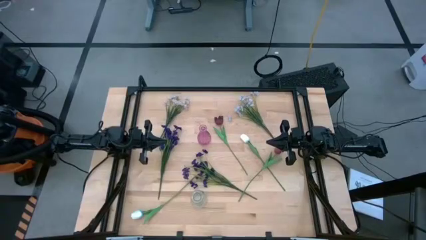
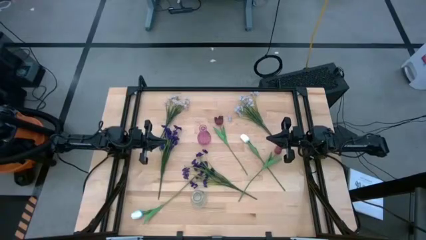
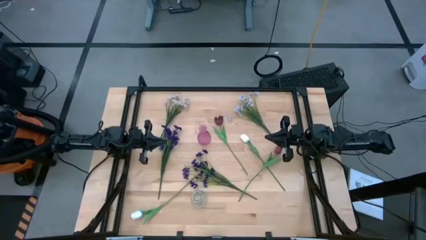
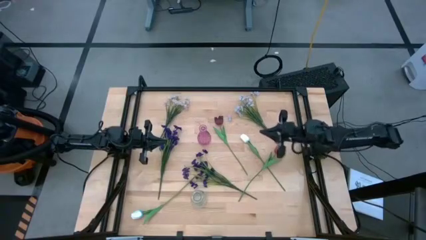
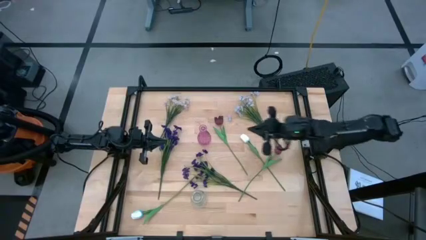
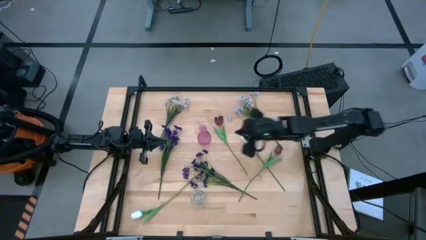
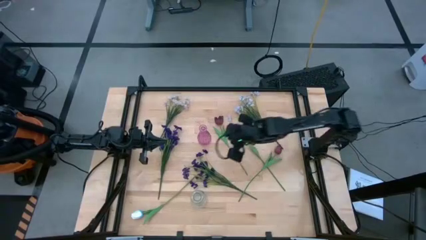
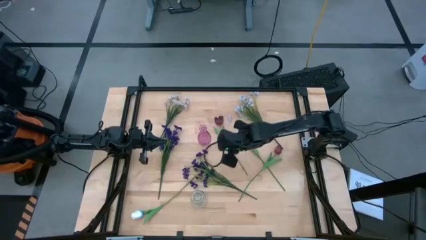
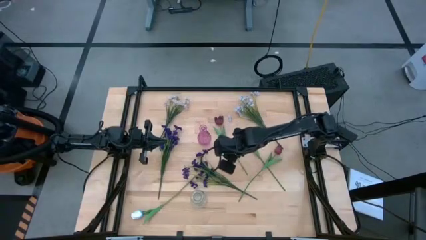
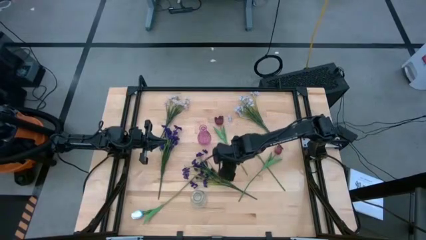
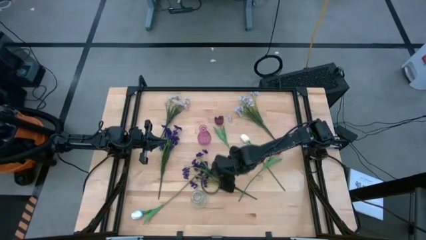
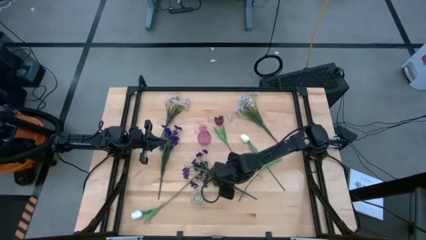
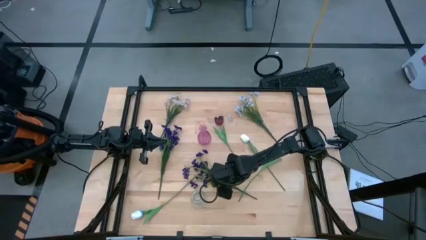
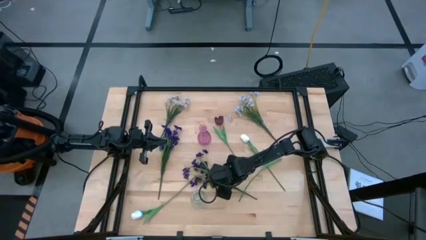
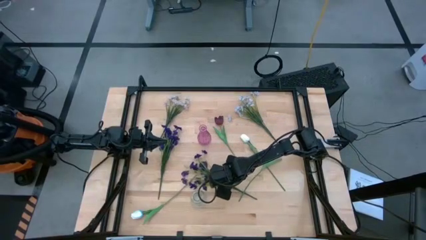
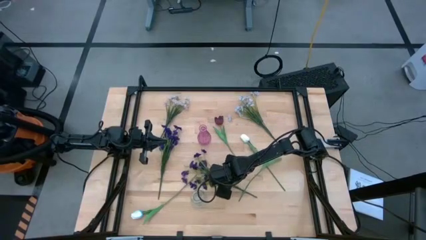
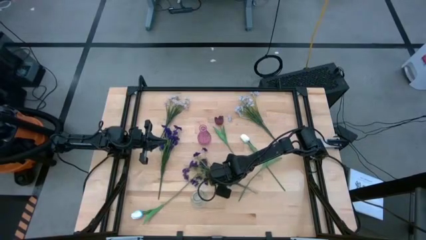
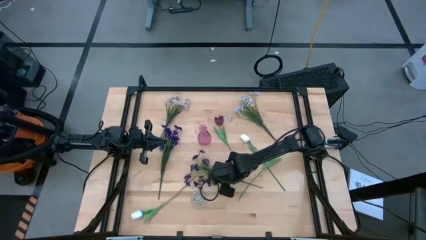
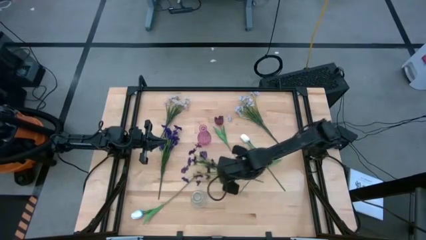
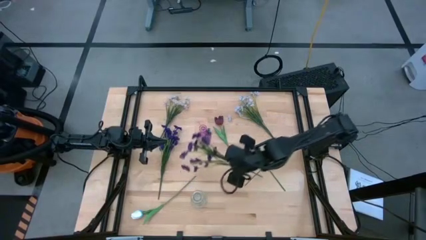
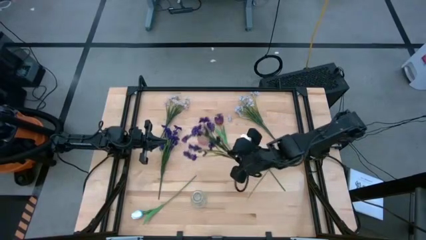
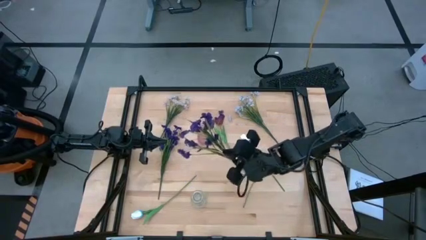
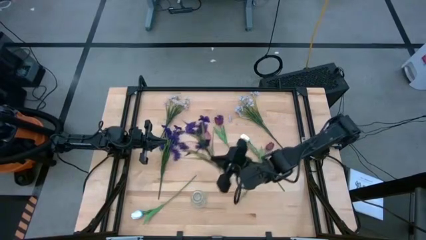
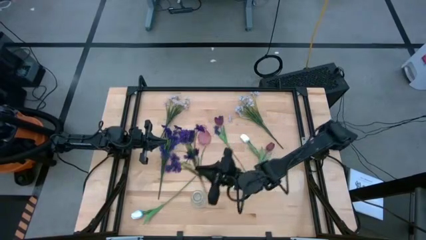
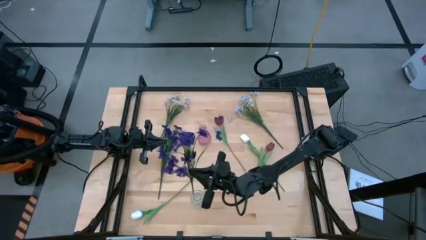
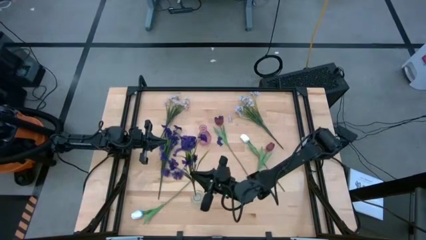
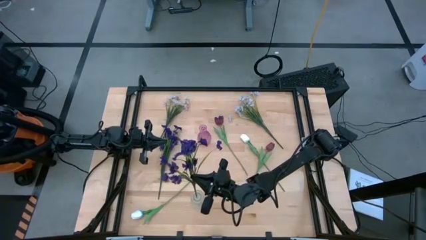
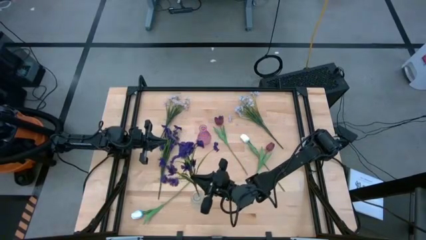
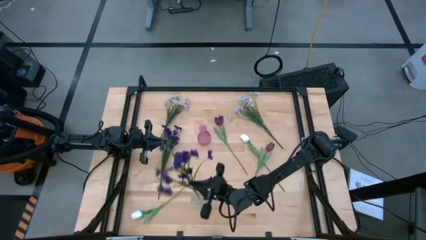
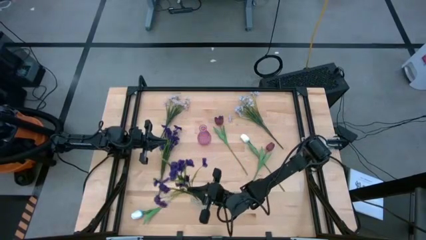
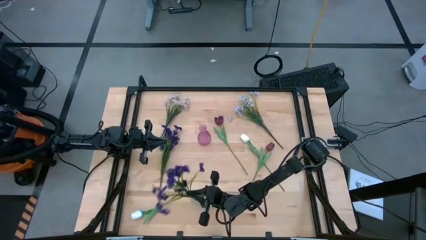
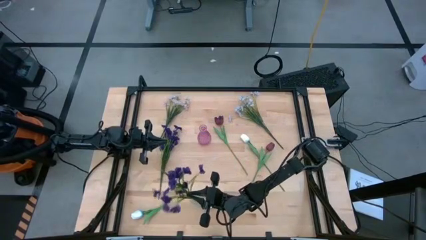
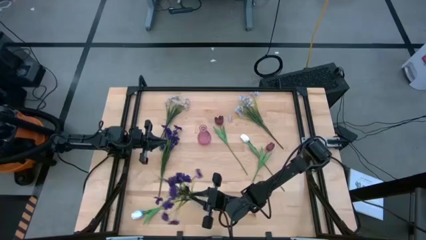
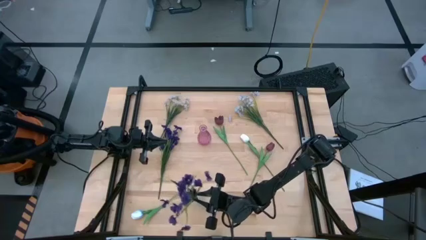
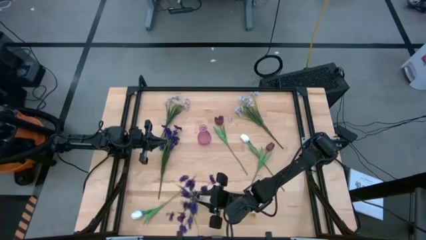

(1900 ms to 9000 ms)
Task: Sort flowers into vase by color
Put the right purple flowers into the transparent vase

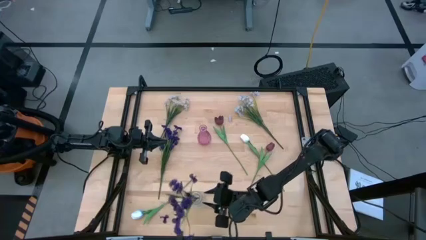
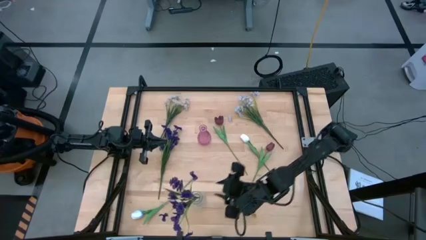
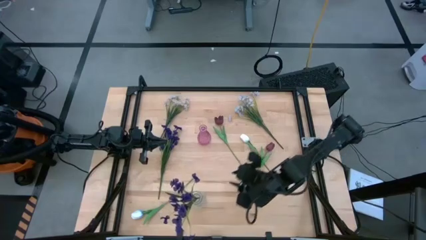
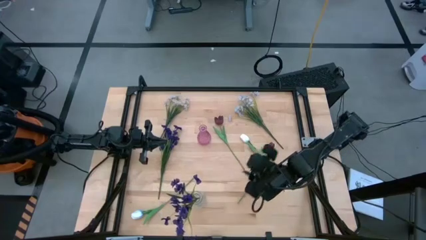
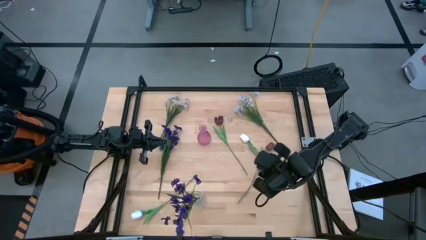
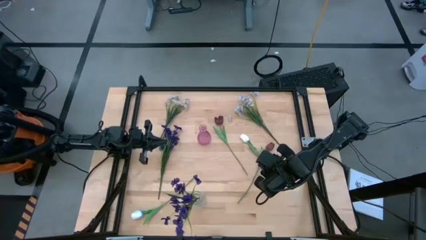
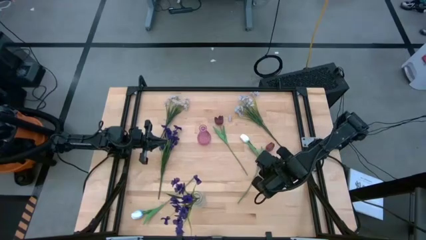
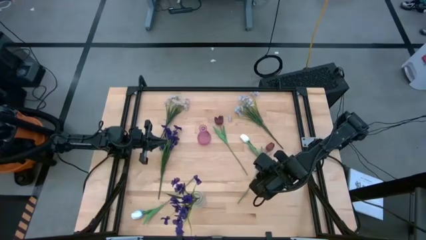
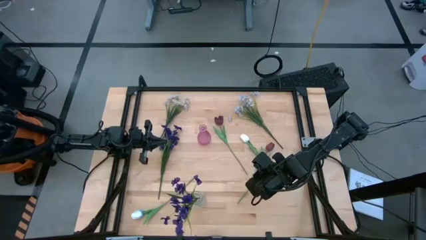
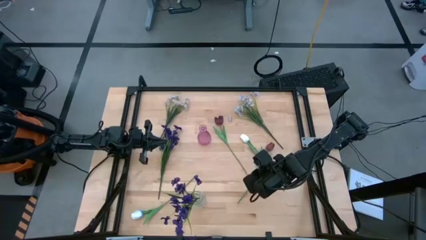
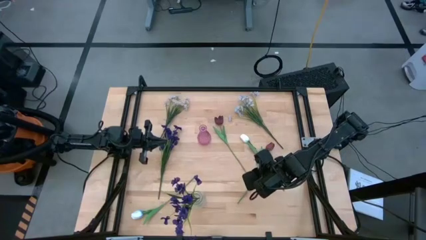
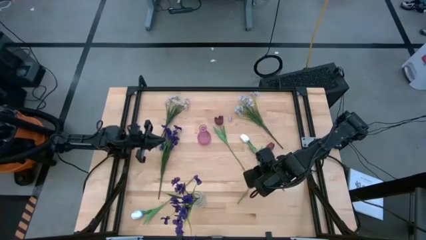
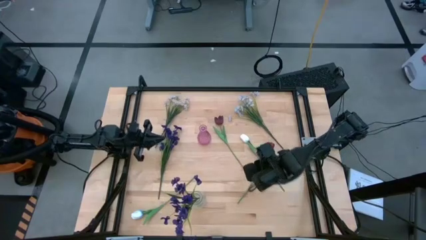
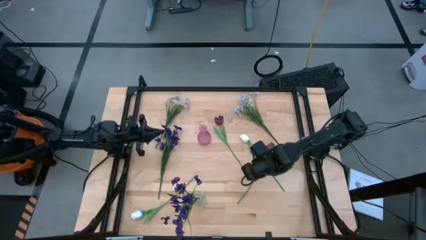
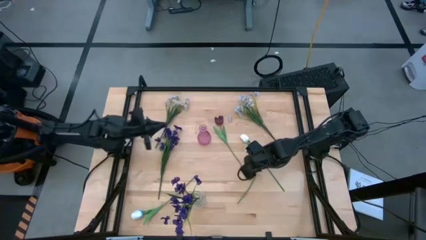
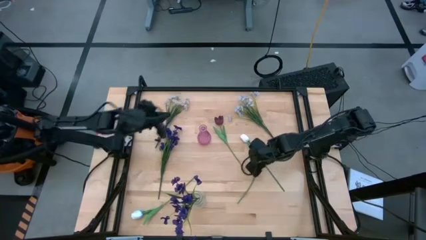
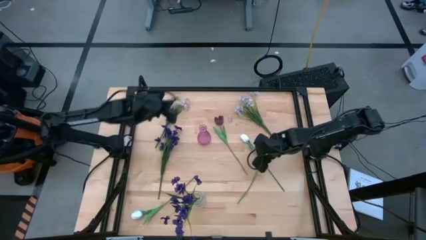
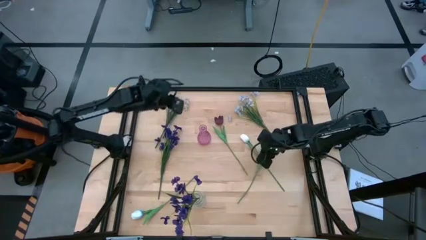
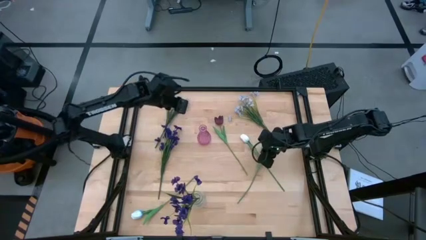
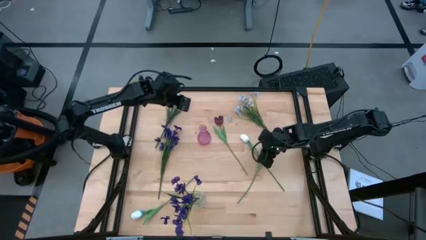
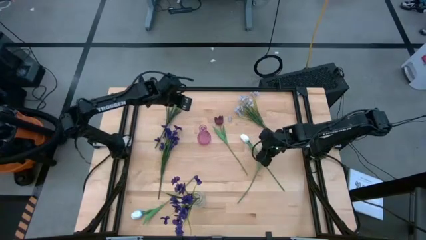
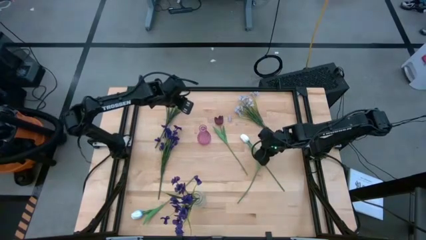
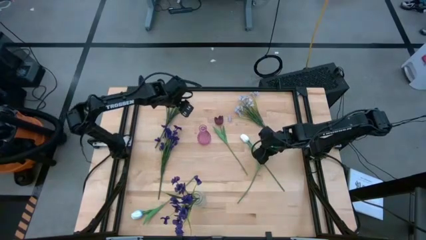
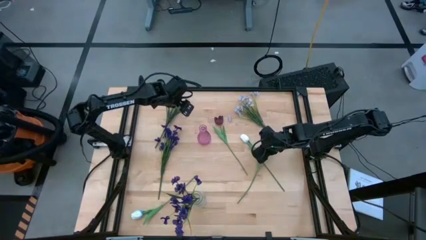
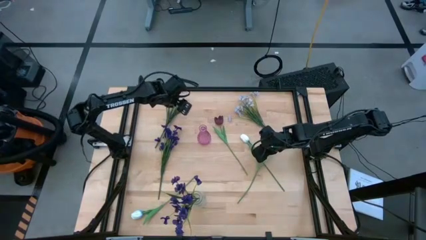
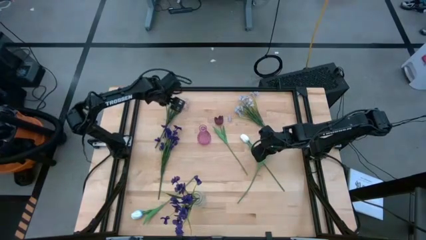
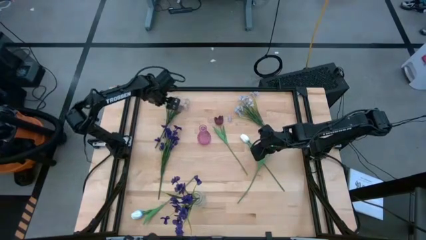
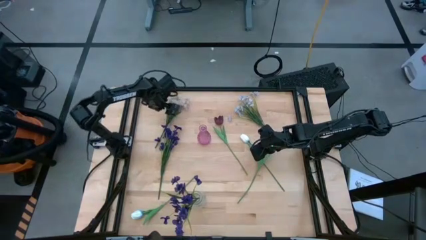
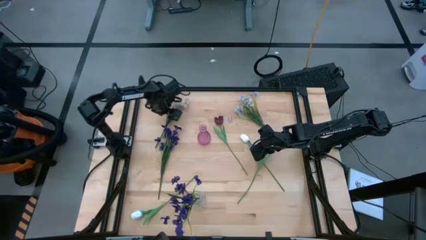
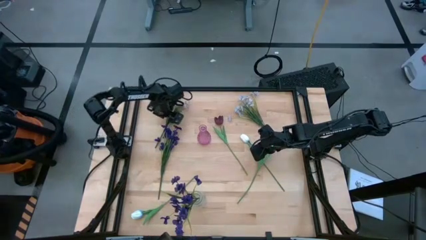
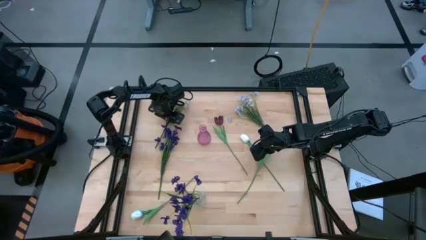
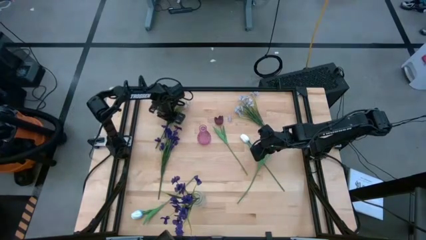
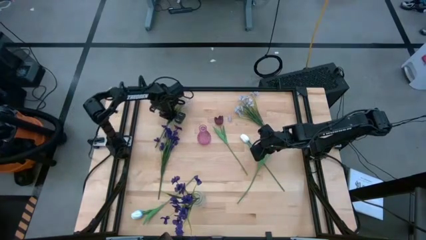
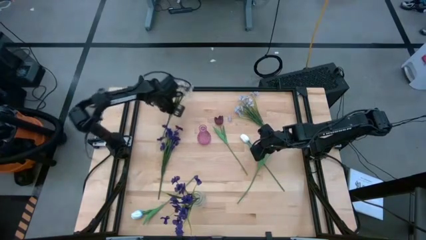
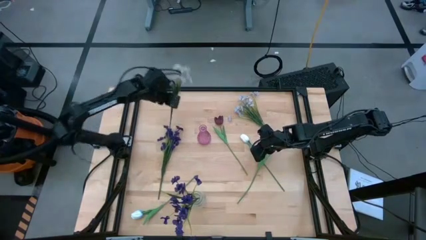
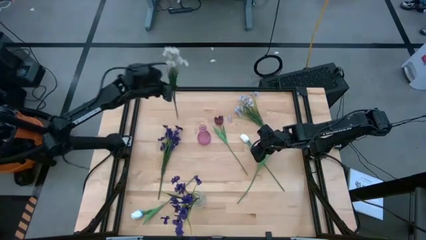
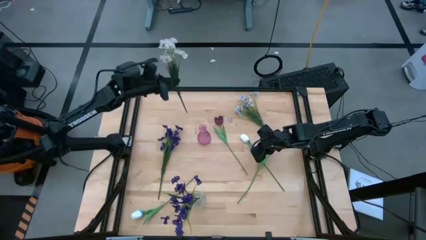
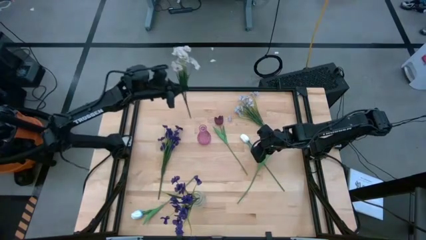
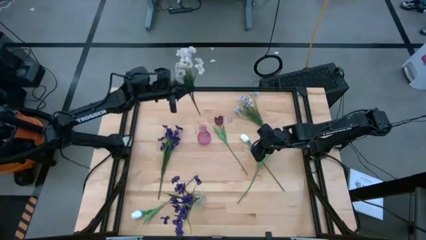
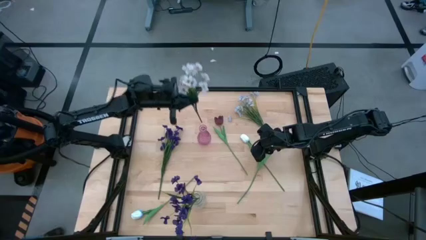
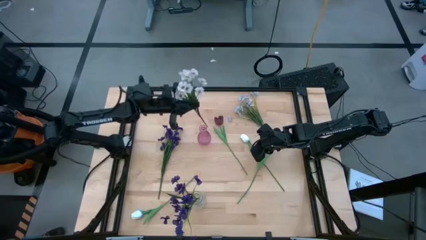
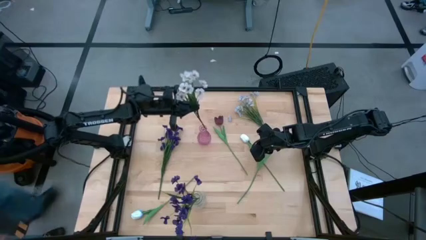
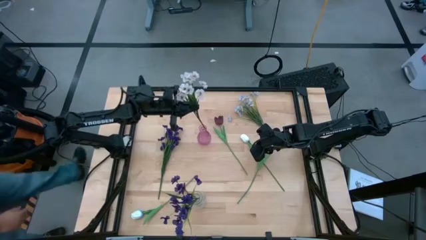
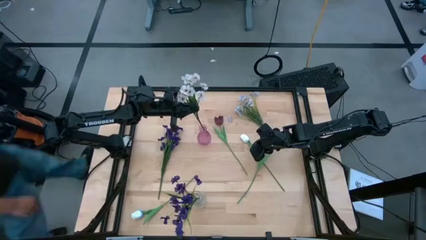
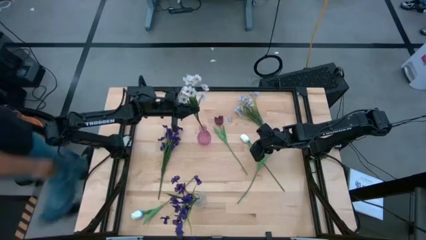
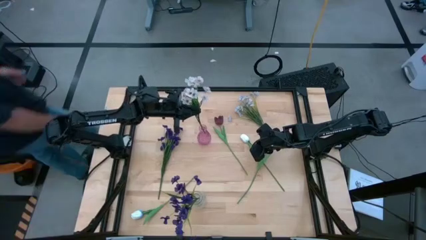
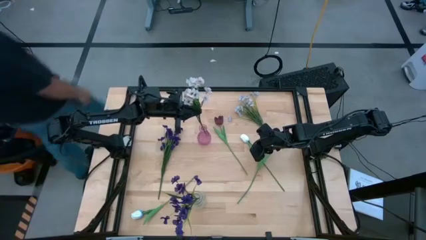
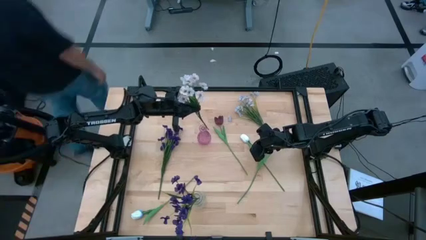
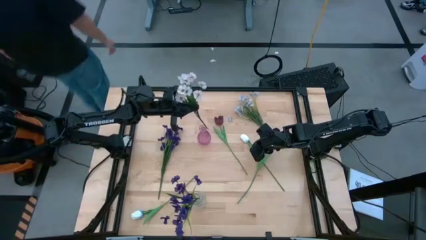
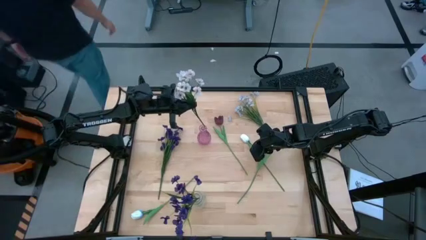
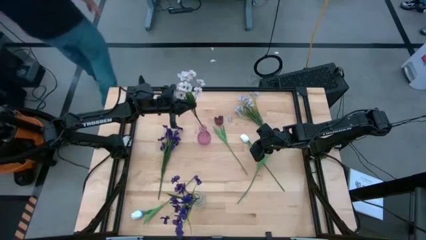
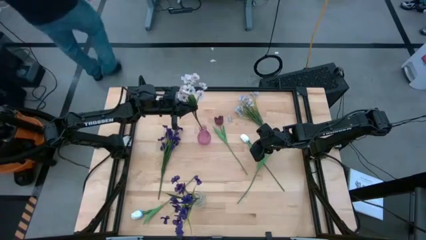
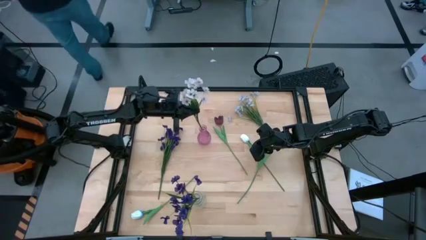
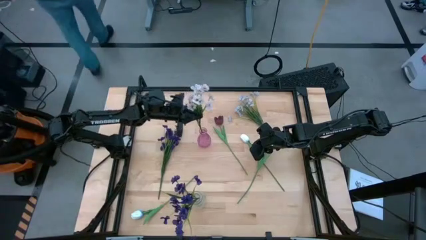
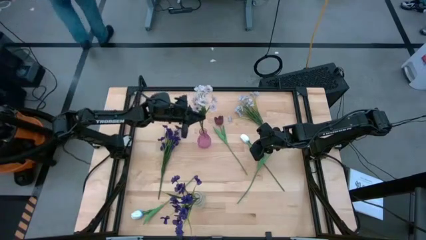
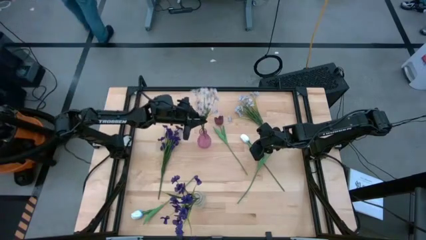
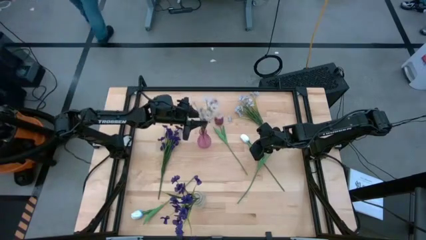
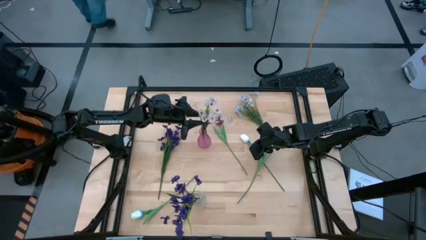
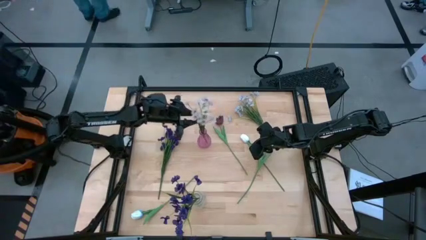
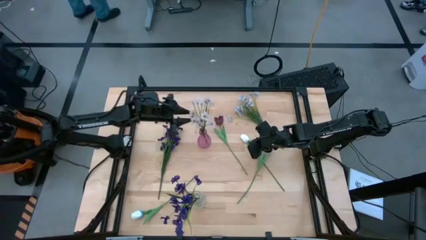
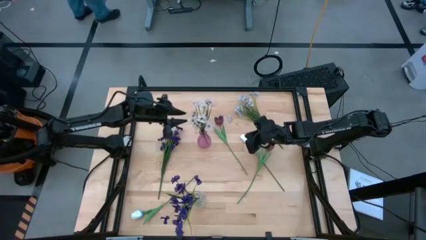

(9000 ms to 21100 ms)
Put the left white flowers into the pink vase
